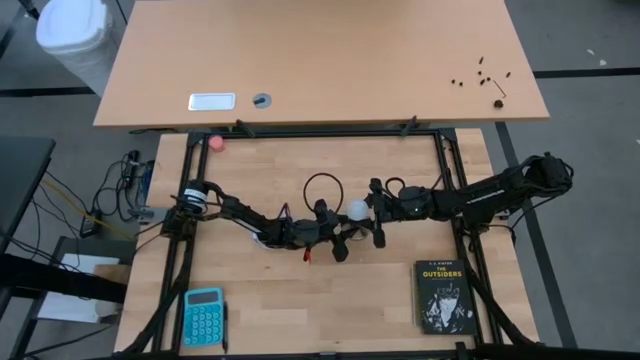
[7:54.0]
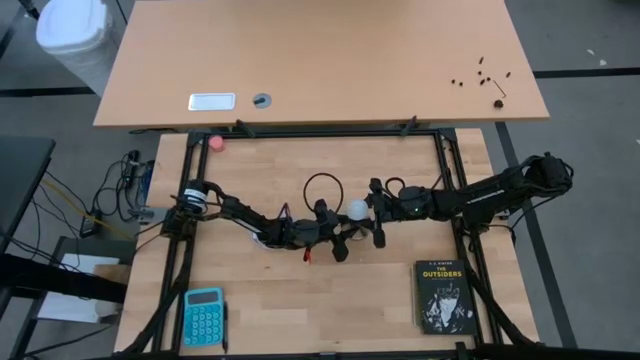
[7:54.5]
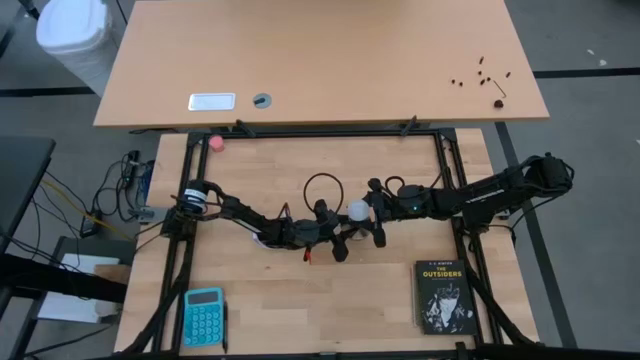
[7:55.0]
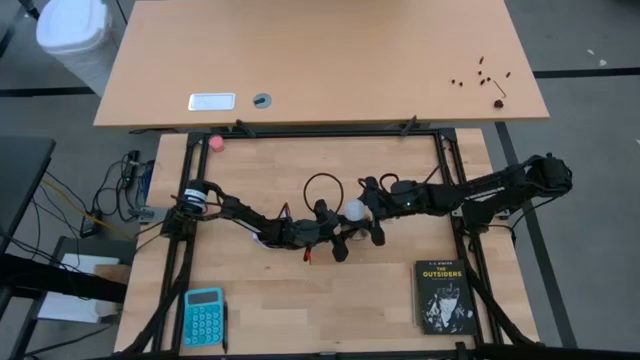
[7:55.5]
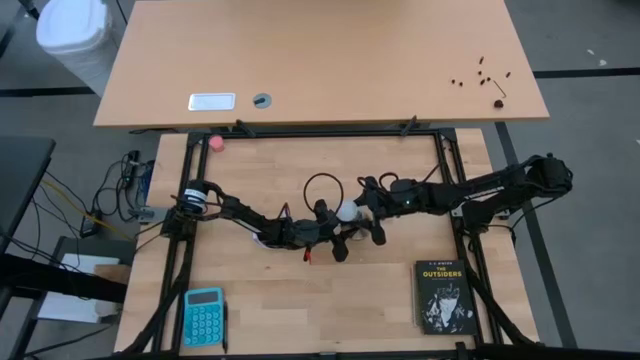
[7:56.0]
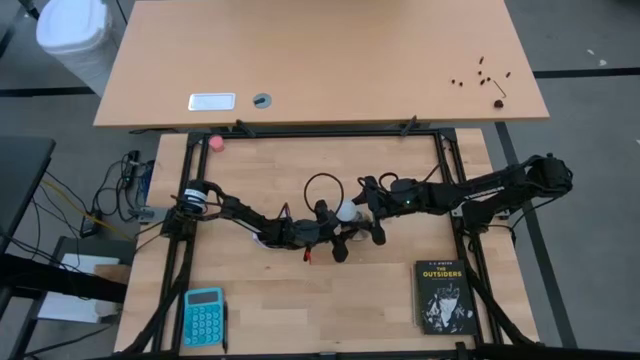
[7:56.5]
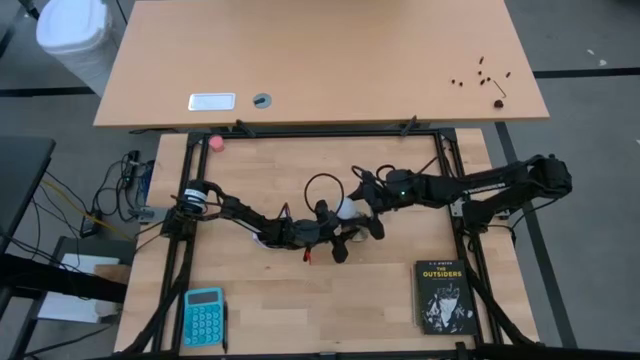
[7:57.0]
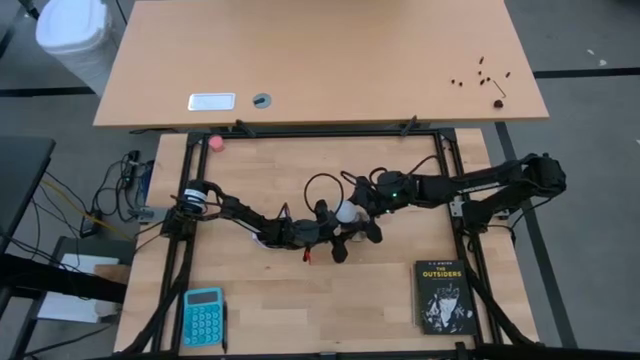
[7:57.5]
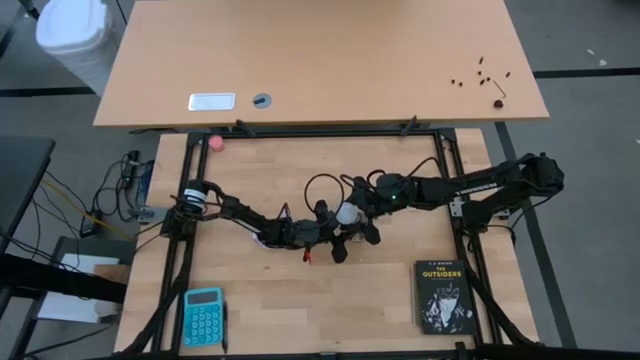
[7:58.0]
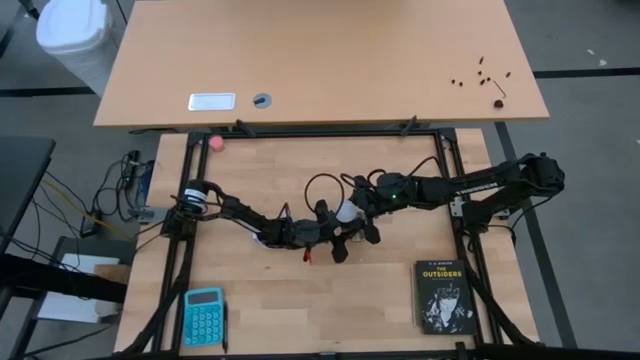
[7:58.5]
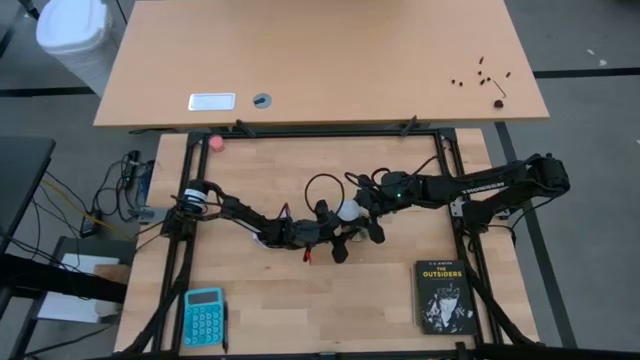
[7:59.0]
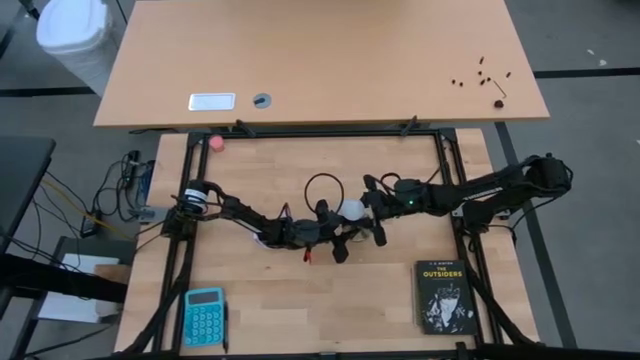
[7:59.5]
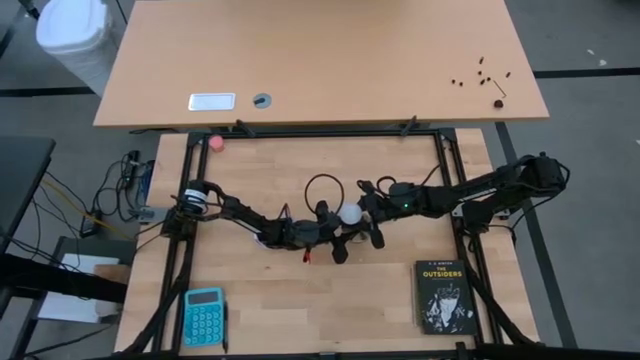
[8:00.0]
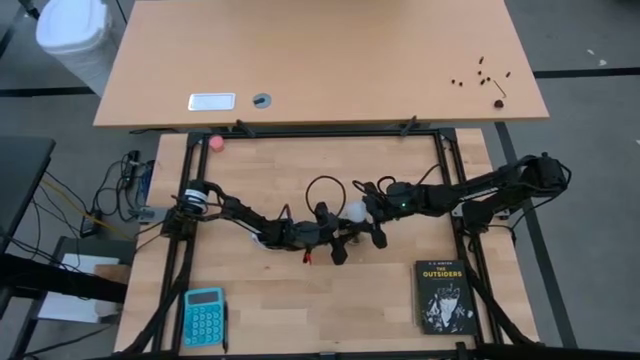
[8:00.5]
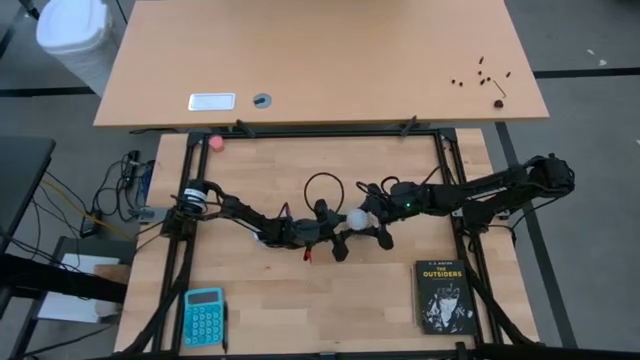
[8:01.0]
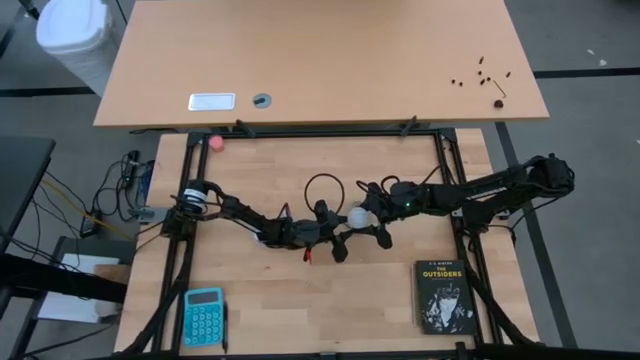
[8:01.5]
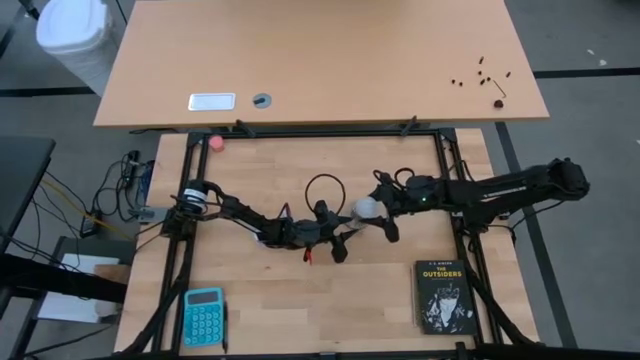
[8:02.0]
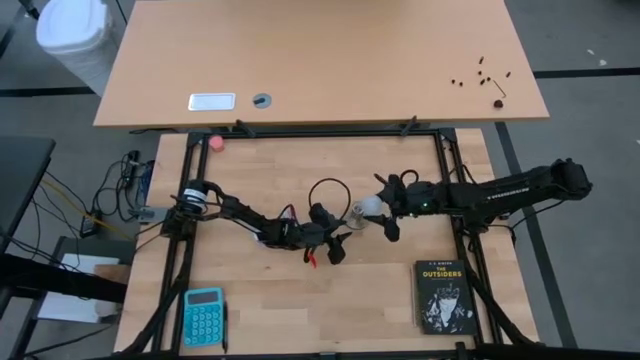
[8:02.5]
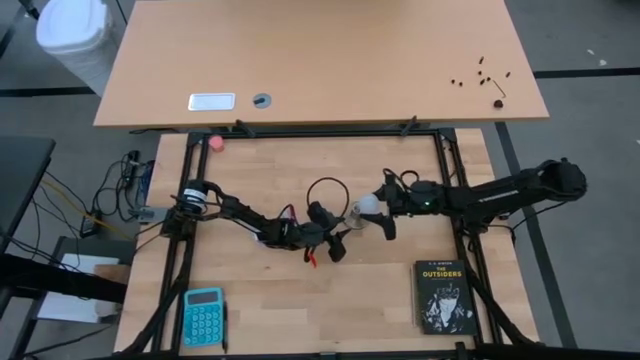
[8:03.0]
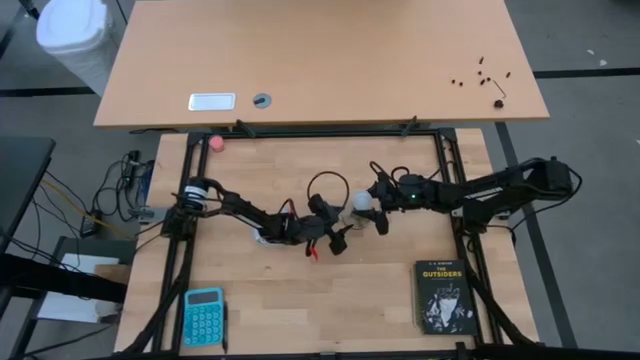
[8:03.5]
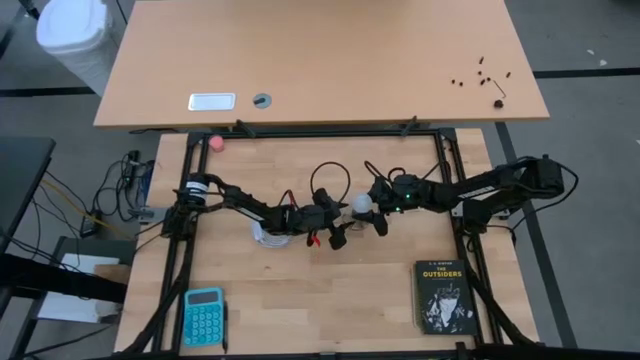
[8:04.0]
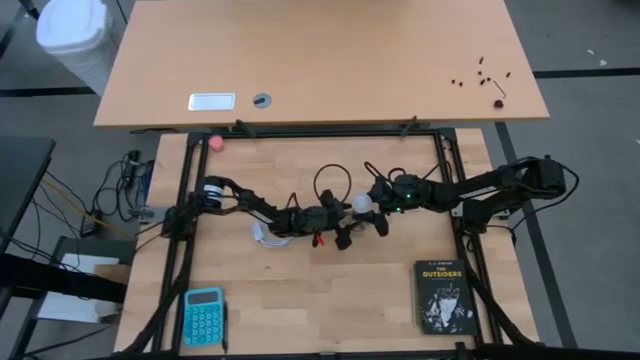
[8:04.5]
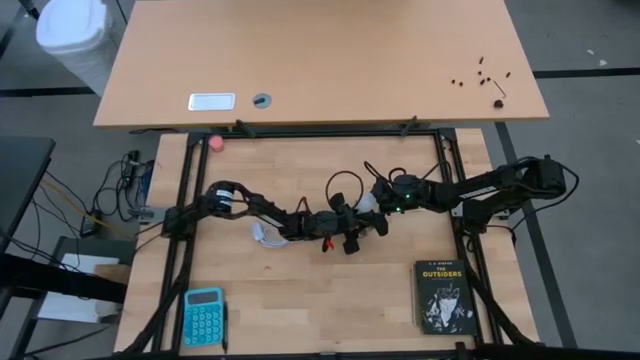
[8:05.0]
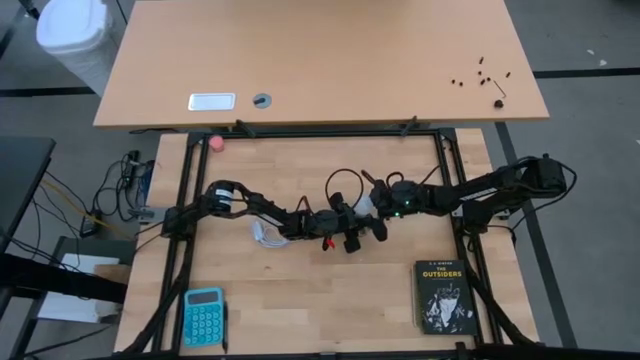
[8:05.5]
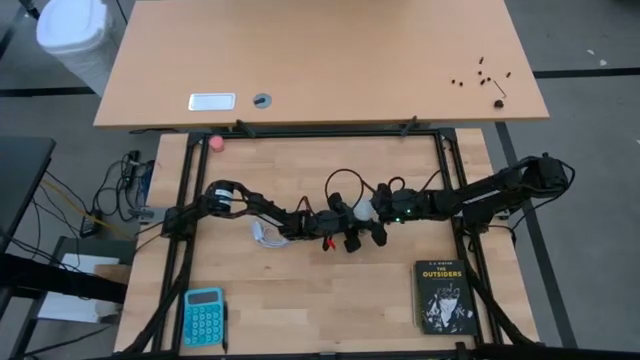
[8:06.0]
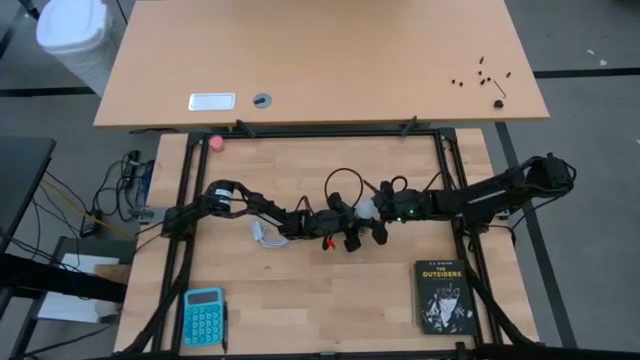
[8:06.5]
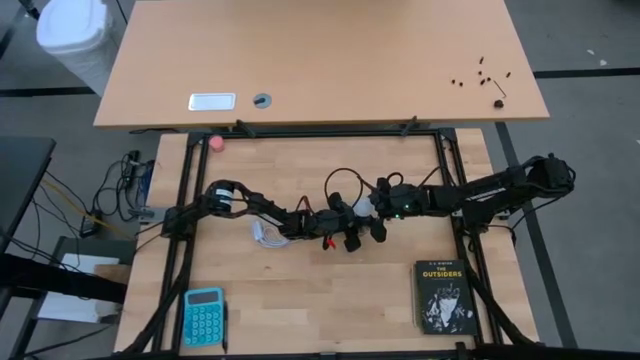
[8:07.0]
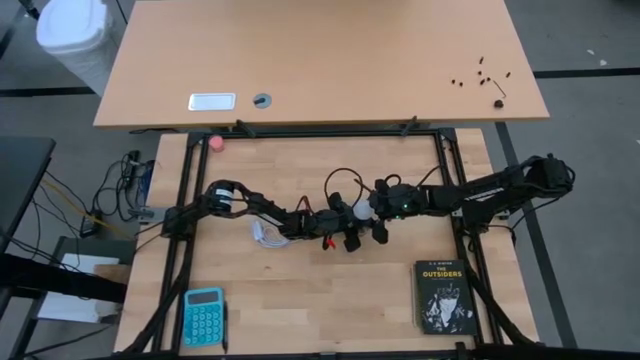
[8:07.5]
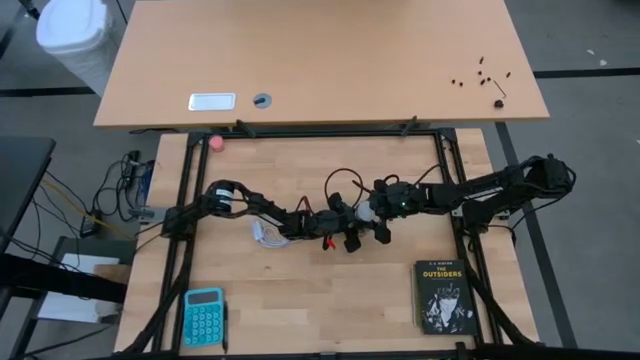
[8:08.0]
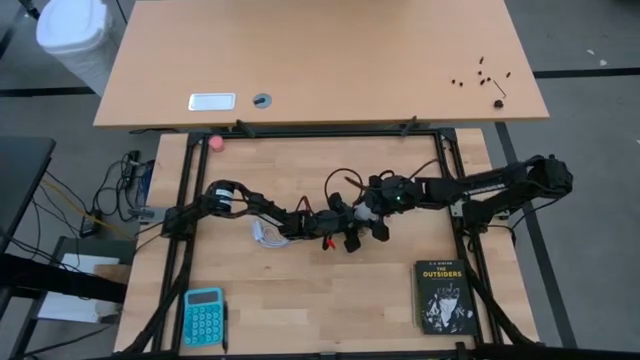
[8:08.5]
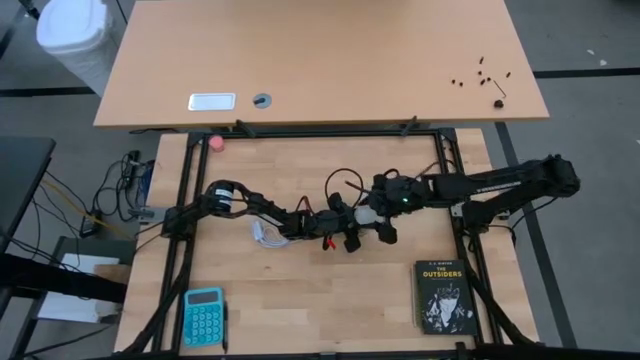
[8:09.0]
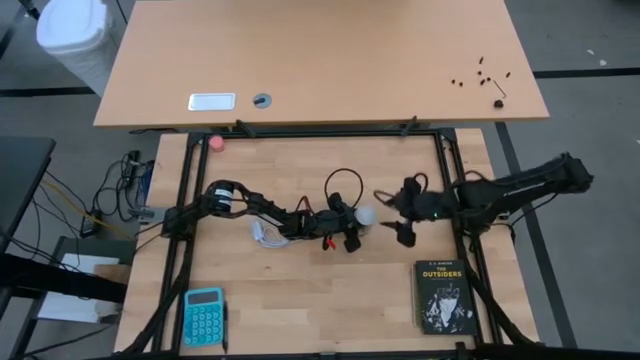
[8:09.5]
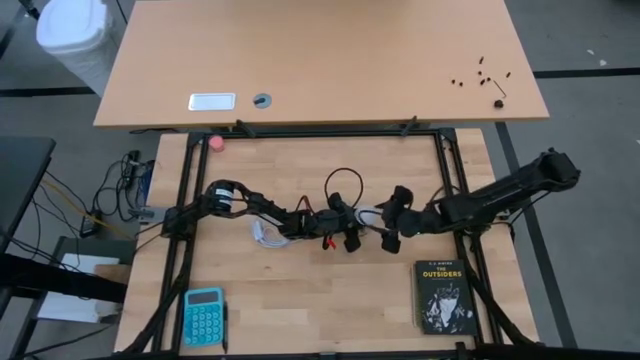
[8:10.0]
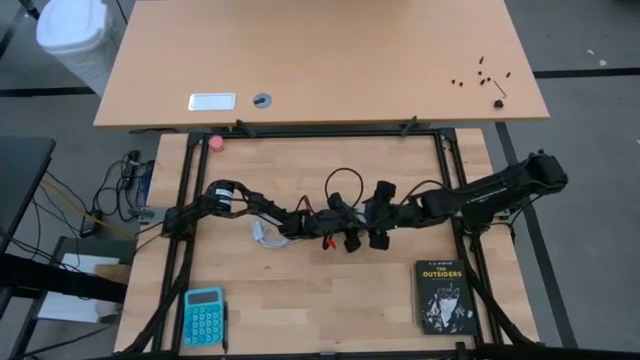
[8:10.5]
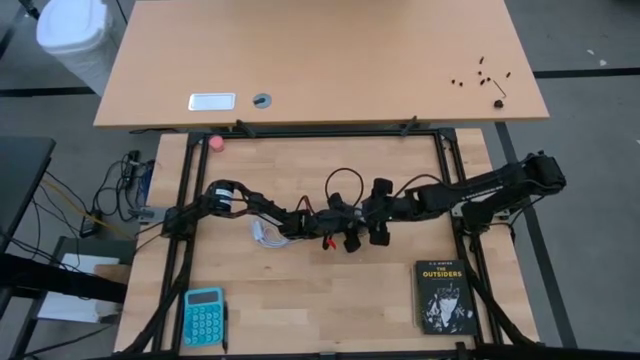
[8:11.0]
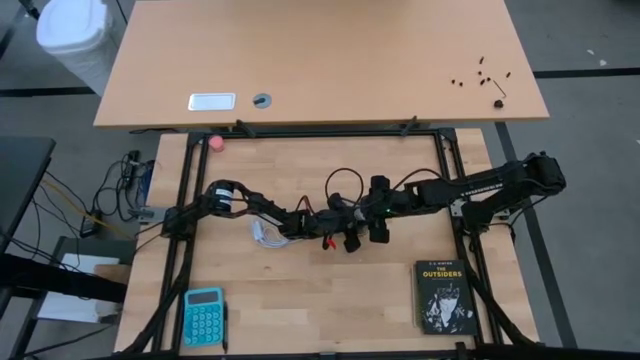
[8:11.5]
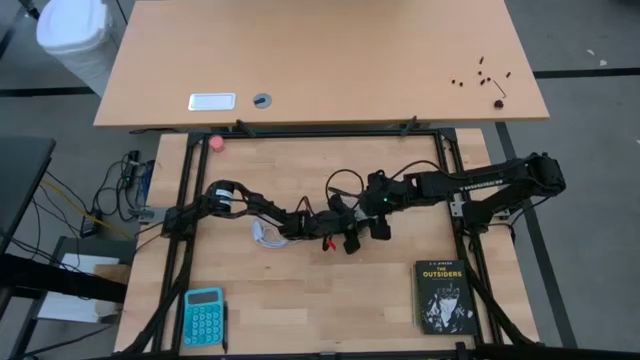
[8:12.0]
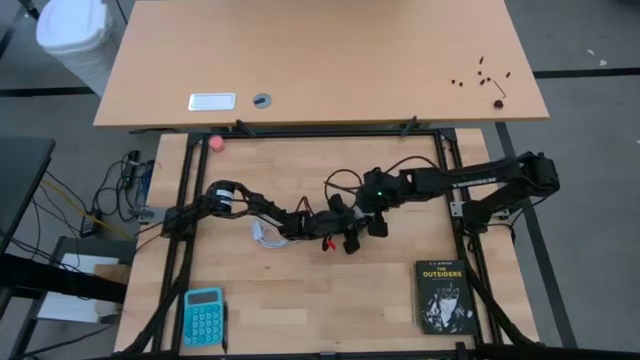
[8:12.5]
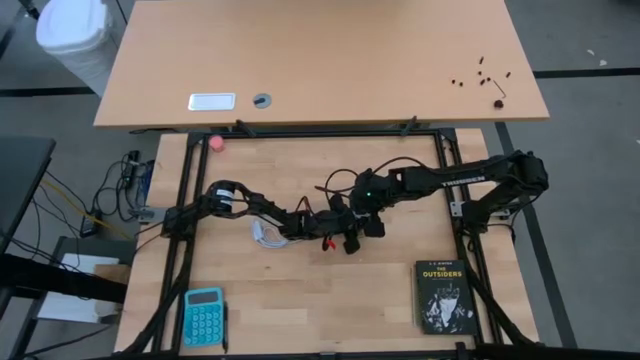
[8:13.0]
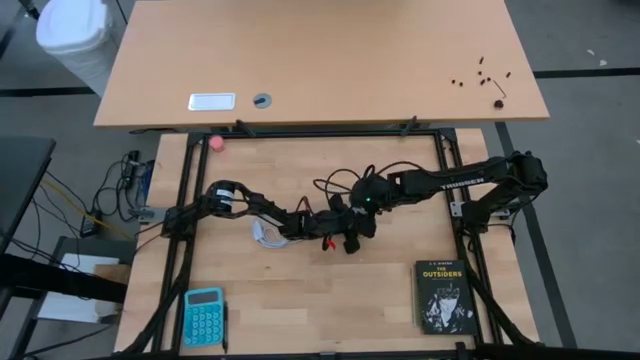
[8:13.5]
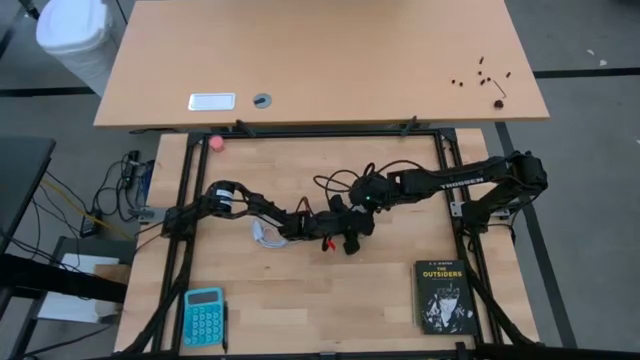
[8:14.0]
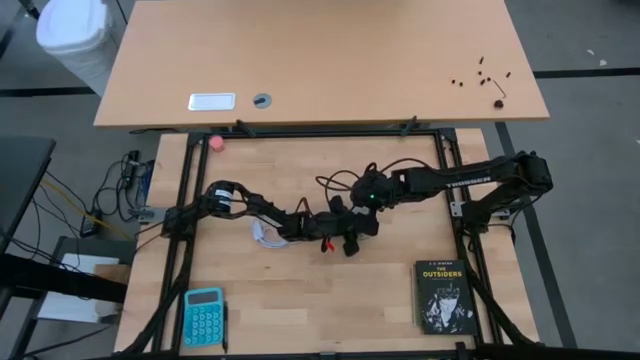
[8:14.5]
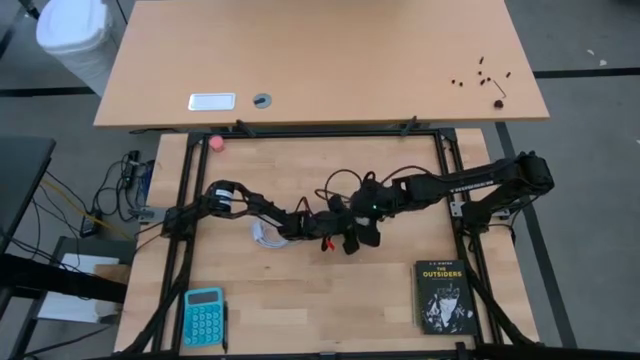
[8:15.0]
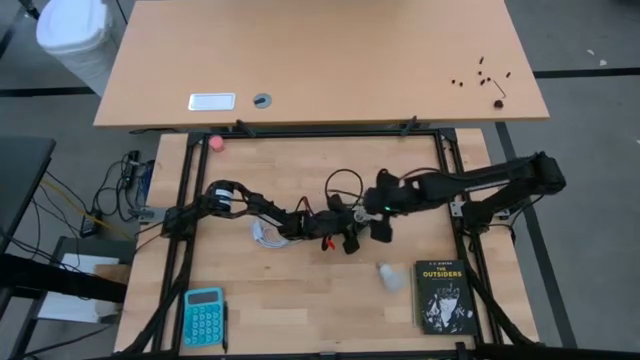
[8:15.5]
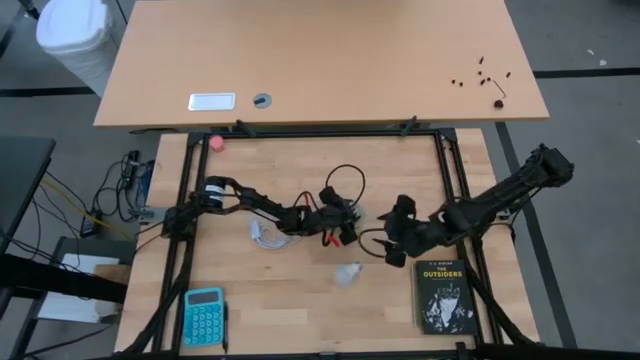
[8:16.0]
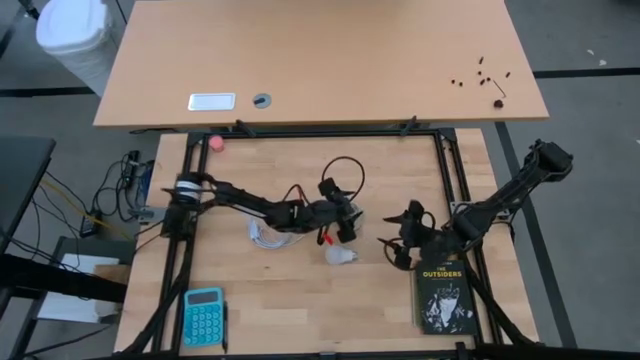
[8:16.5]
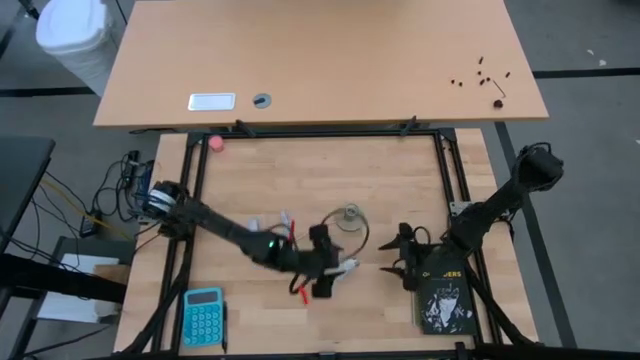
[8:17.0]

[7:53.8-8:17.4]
Task: Screw lightbulb
Insert the white lightbulb into the silver lamp
